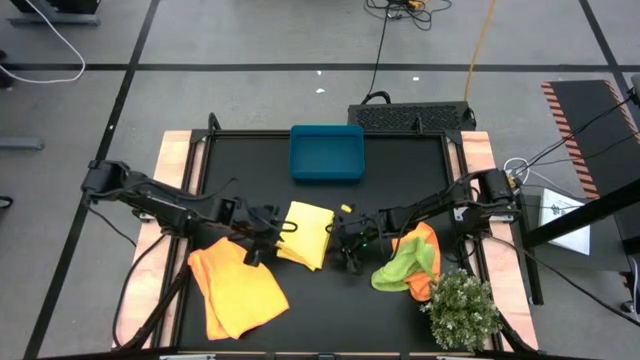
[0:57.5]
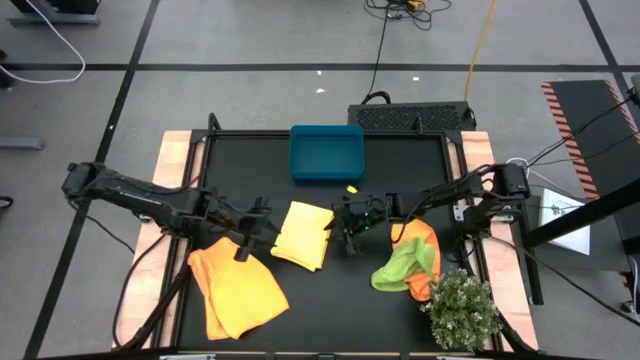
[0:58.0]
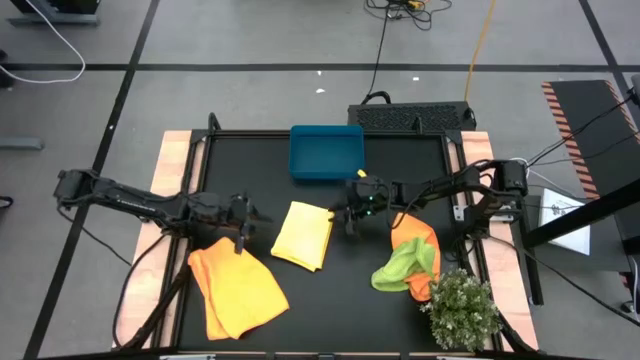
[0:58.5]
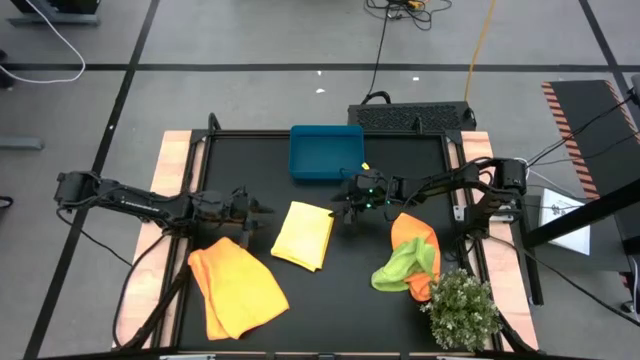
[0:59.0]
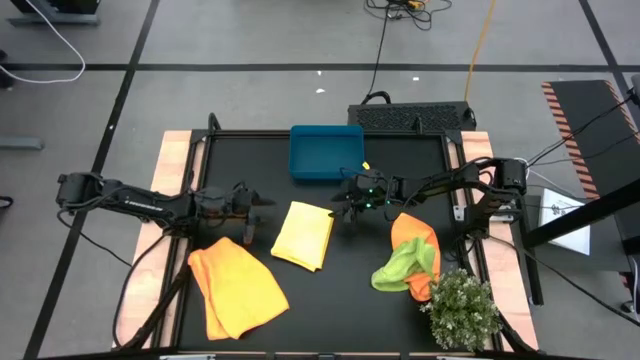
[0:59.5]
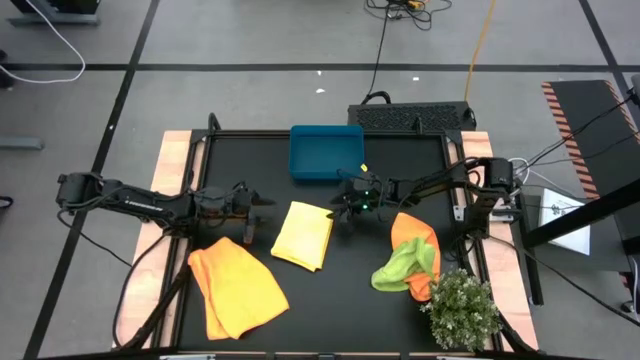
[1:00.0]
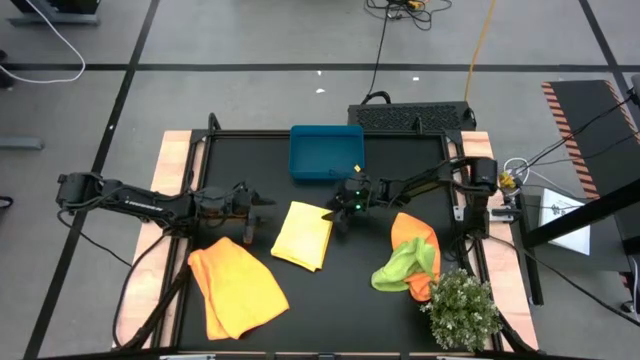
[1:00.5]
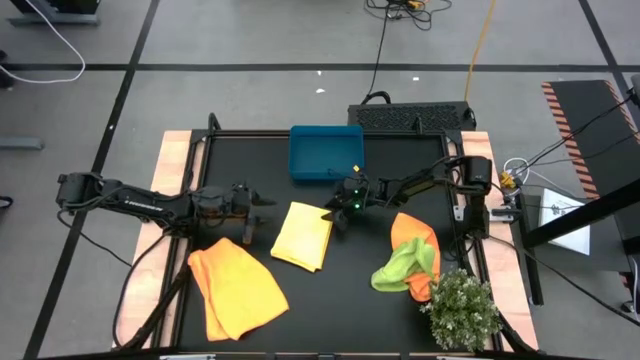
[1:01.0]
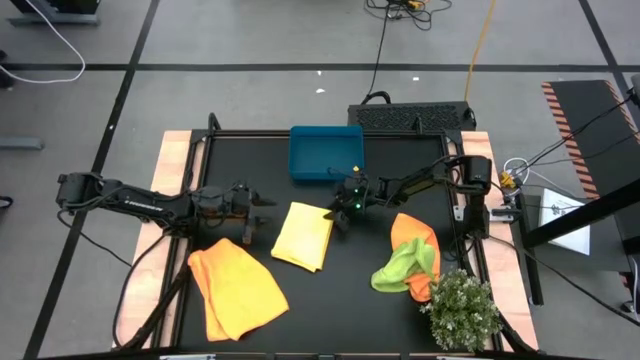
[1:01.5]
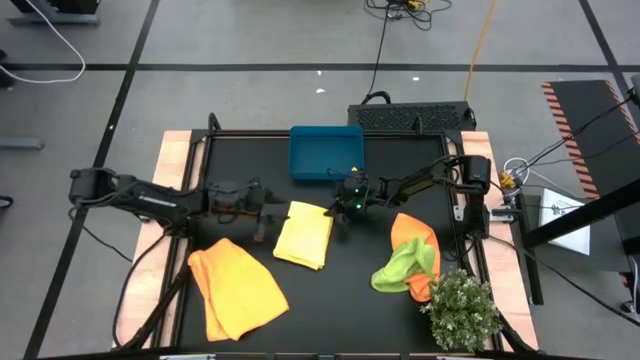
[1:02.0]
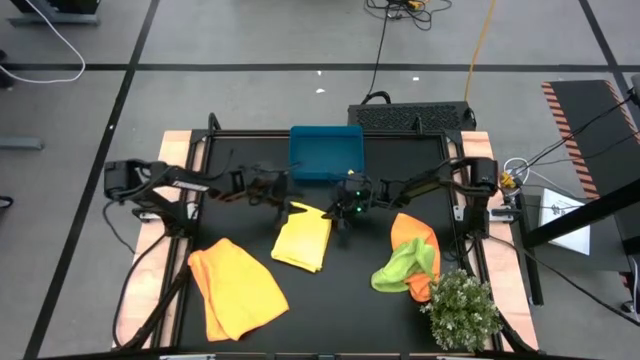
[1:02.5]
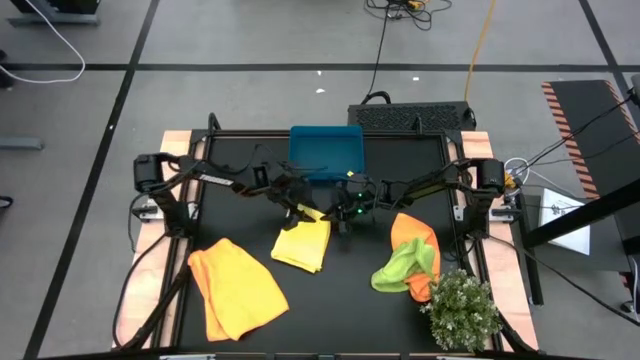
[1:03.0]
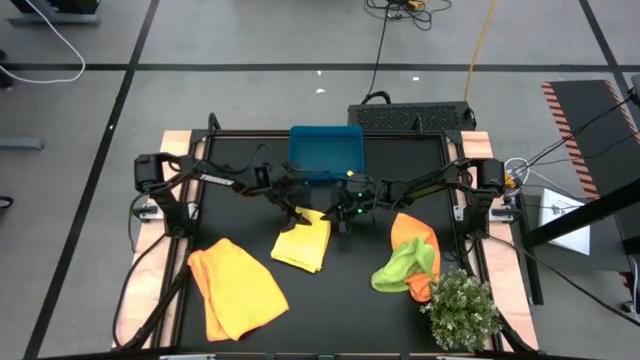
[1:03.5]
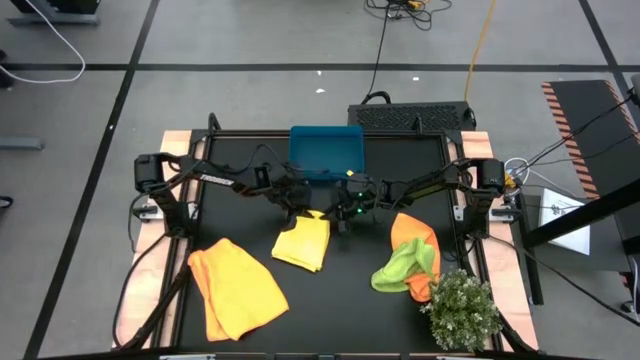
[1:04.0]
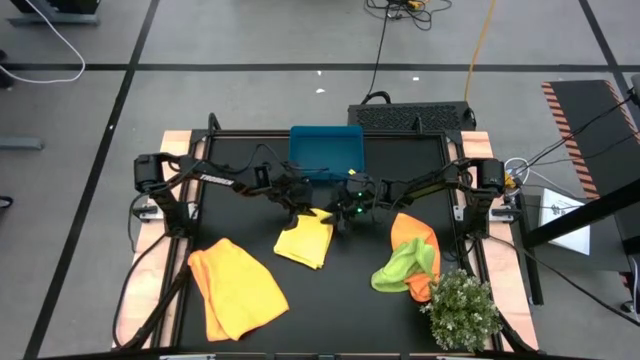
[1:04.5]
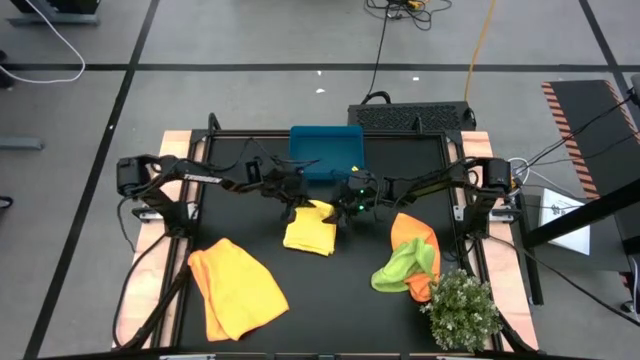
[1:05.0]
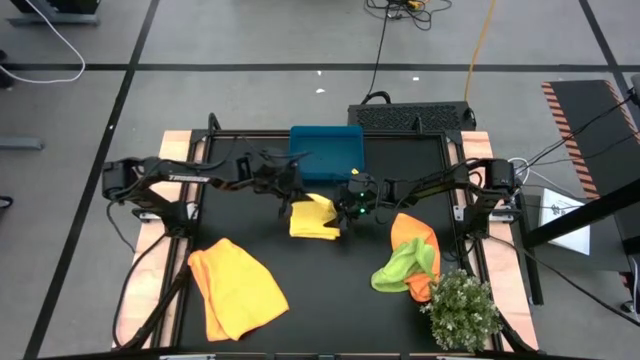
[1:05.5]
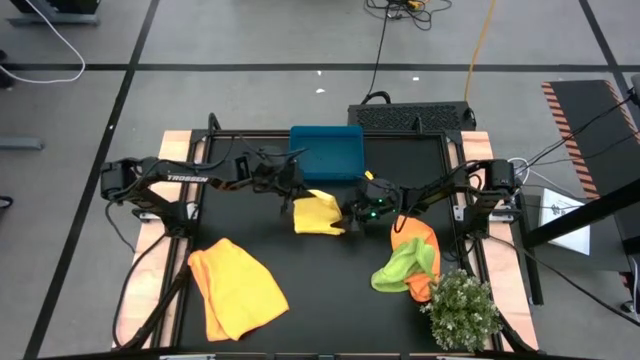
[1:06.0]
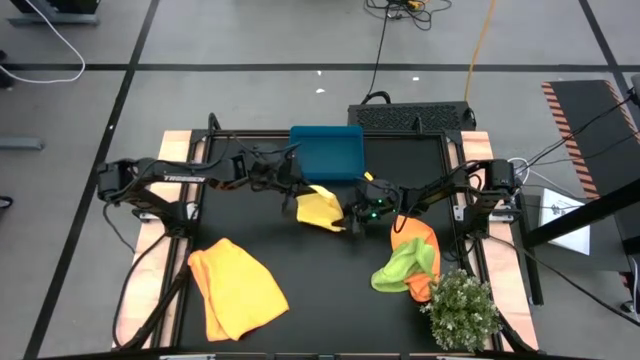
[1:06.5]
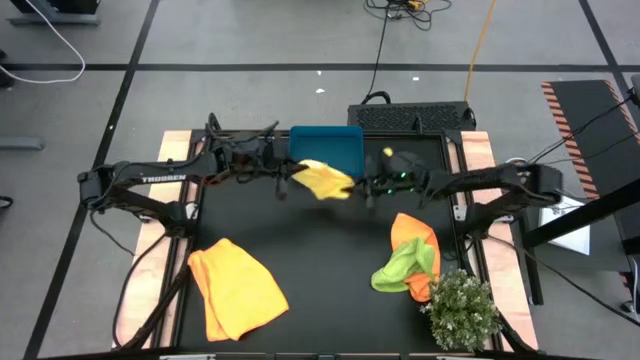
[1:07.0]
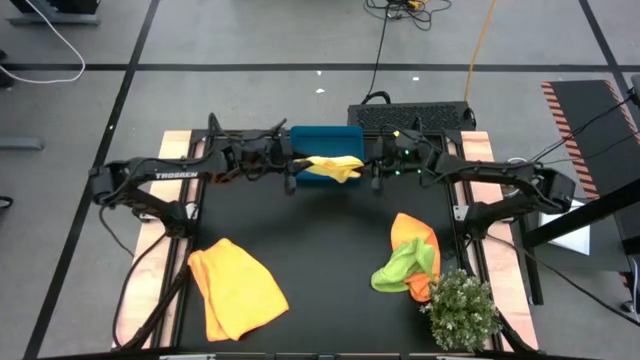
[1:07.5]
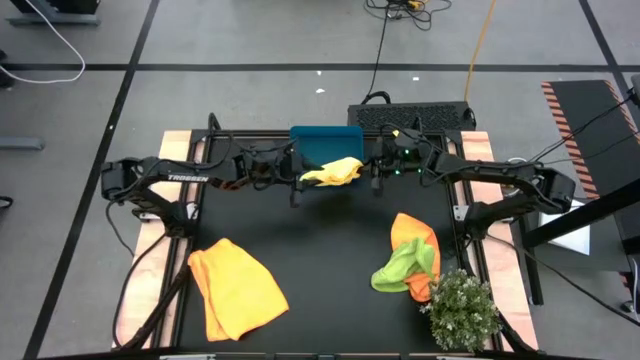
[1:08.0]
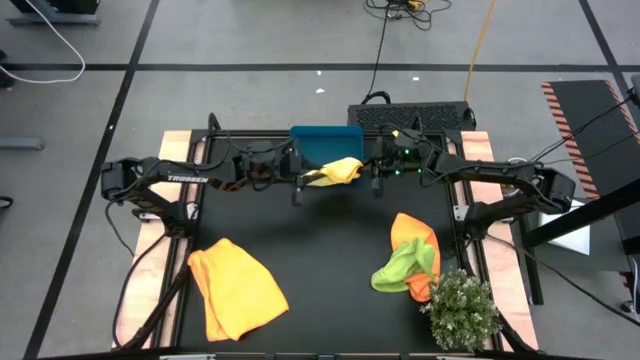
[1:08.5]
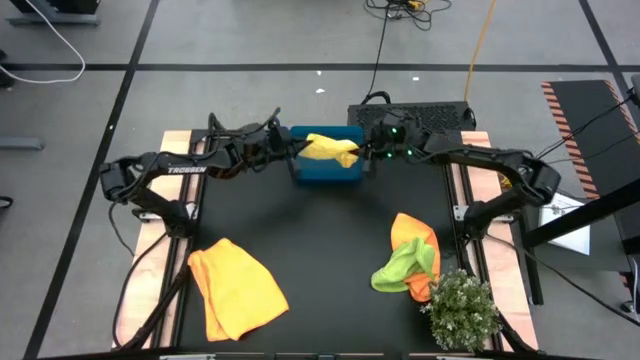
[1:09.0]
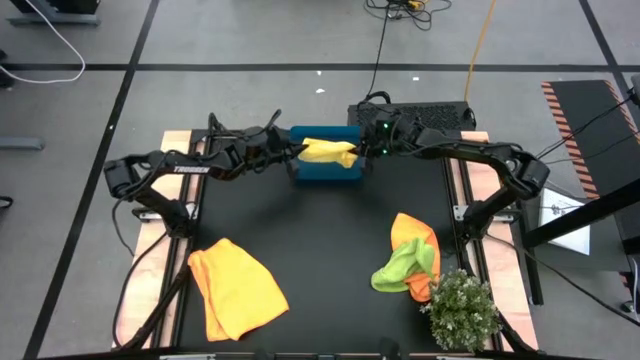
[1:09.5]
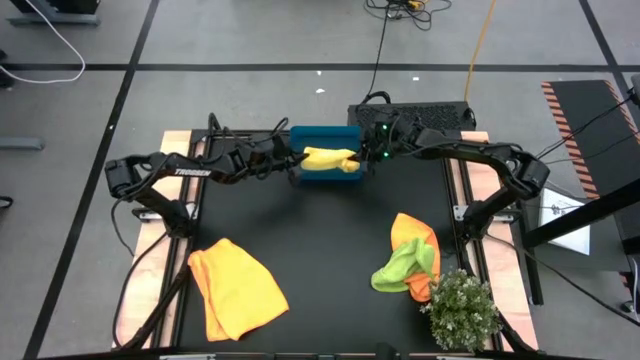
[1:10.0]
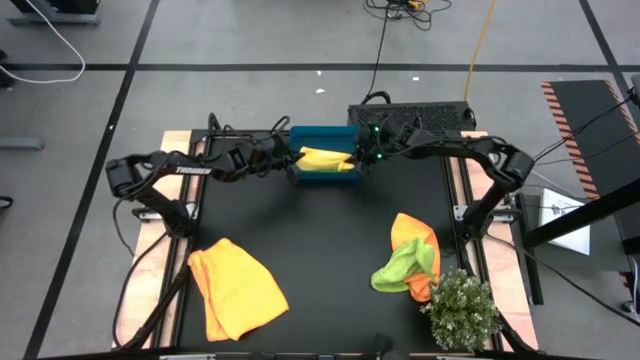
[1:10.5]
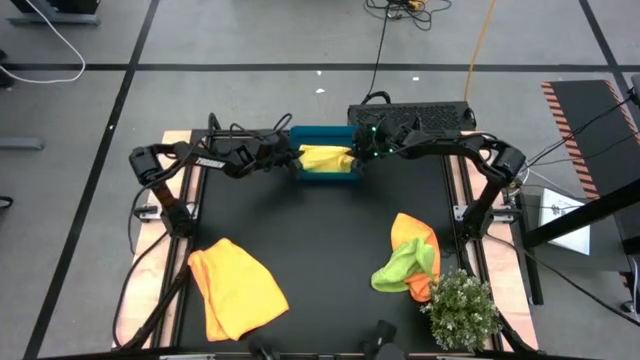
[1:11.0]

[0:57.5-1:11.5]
Task: Fold microfiber towels
Put the folded yellow microfiber towel into the blue bin

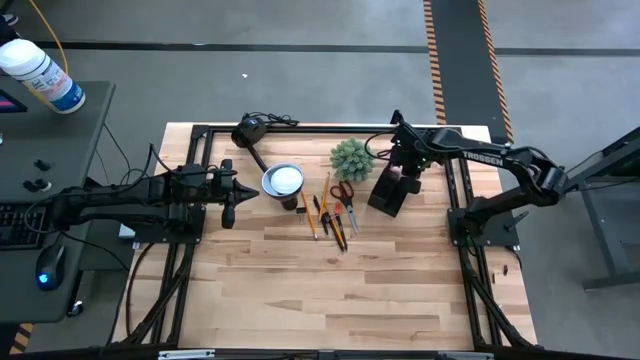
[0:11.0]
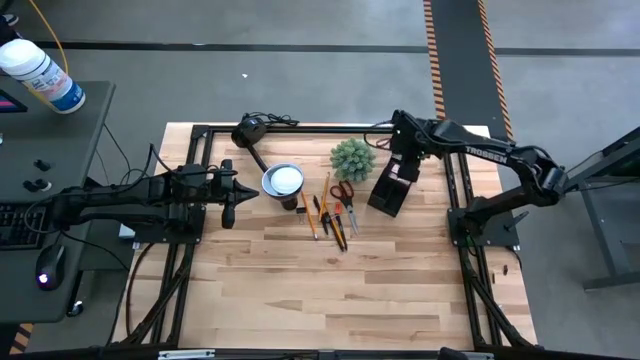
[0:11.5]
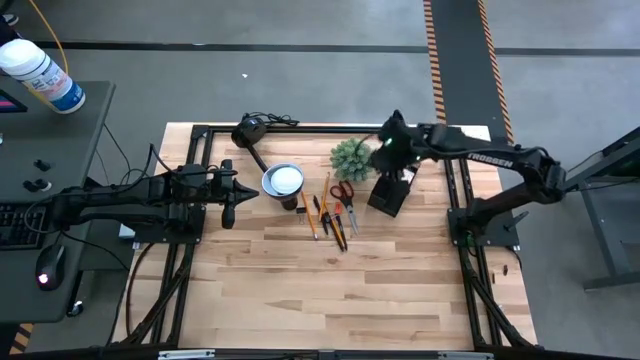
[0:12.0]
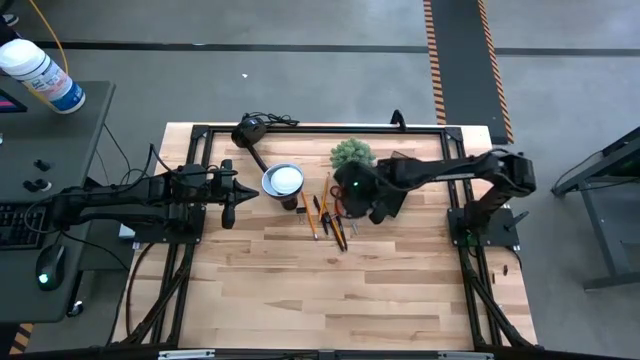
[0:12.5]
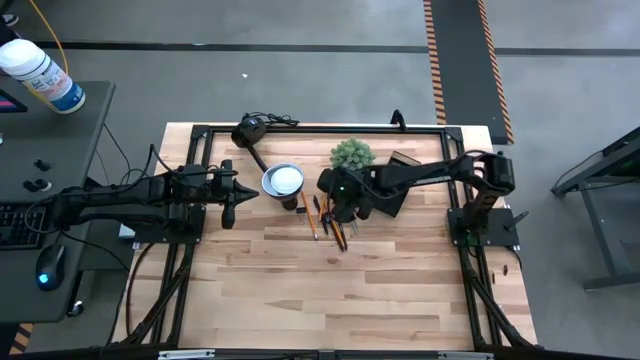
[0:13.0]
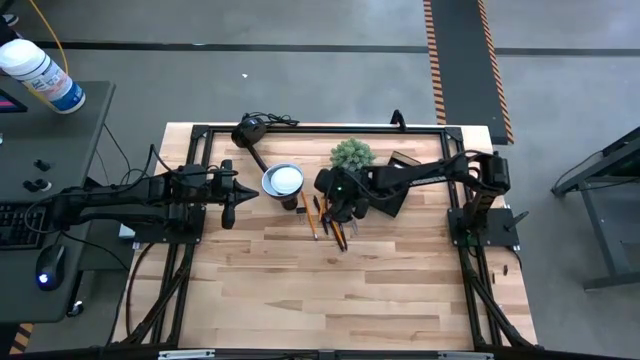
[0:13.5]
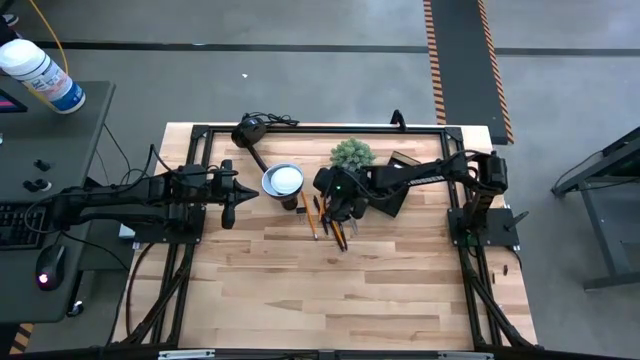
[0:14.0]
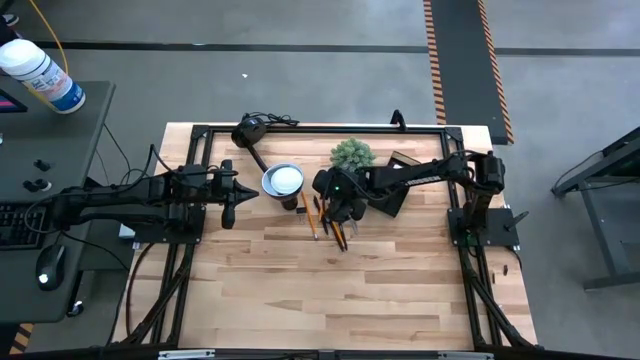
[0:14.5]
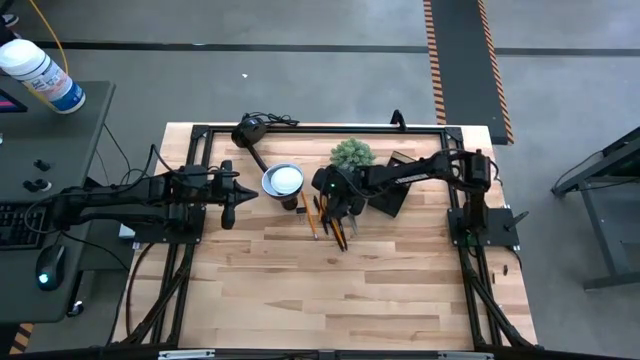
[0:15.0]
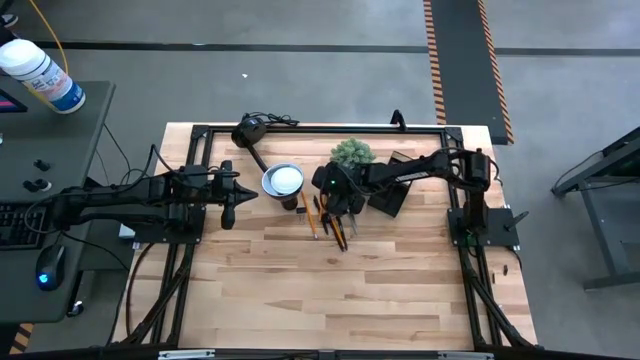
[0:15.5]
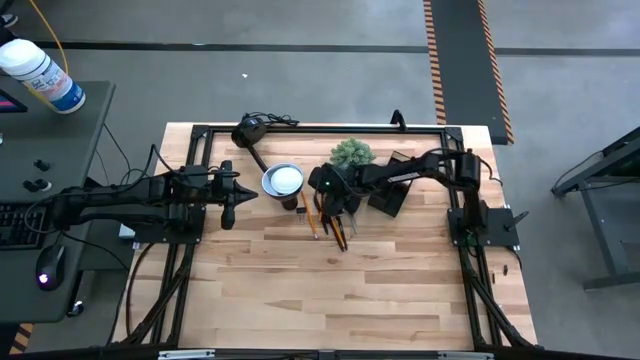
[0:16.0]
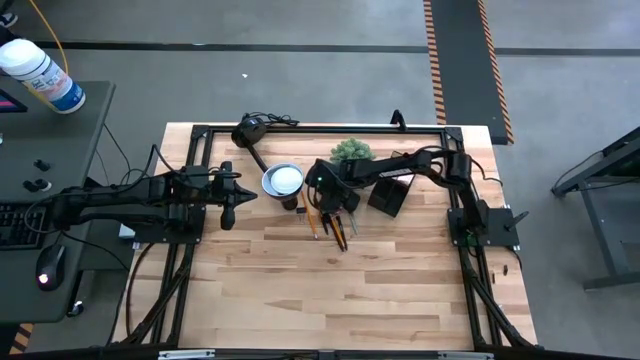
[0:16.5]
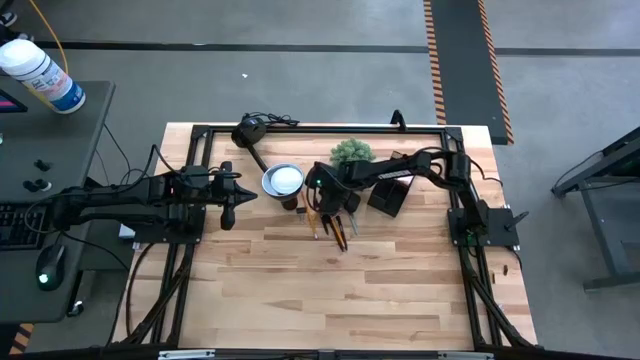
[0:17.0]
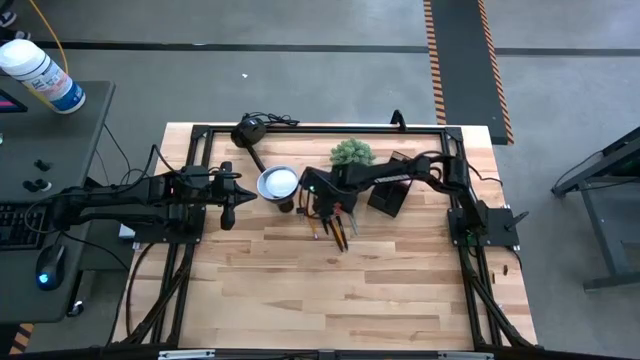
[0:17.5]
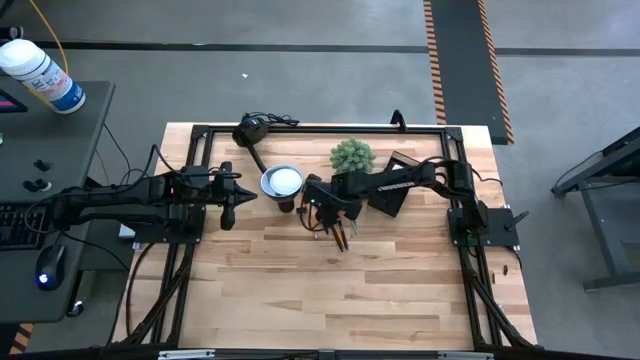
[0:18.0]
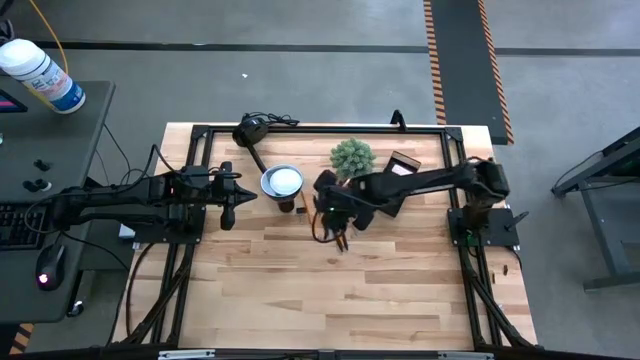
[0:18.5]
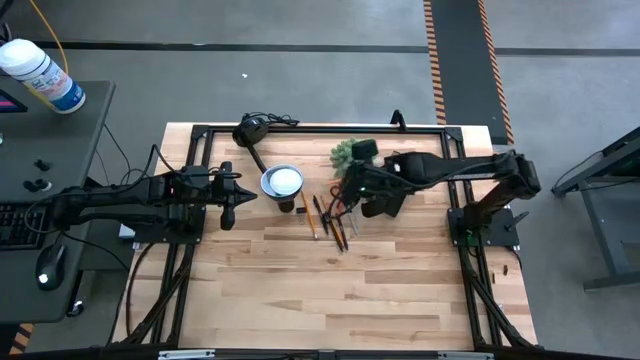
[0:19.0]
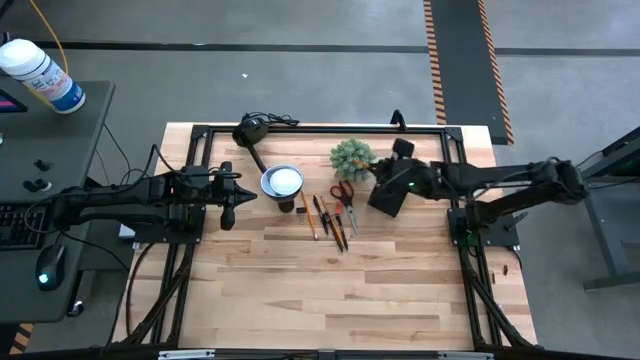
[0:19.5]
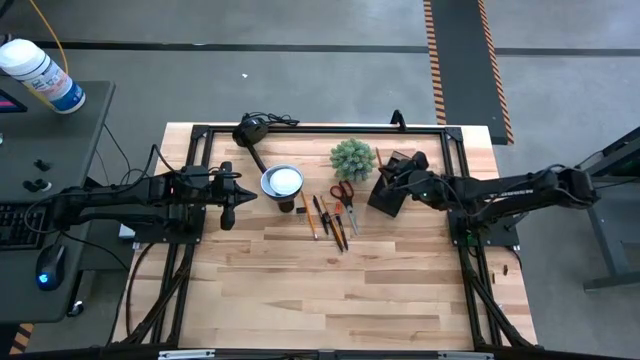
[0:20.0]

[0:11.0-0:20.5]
Task: Pick and place office supplies into organizer
Put the top orange pencil into the desk organizer
